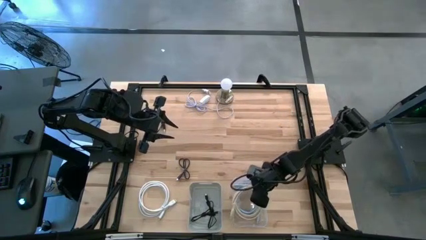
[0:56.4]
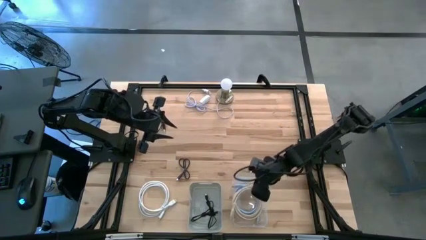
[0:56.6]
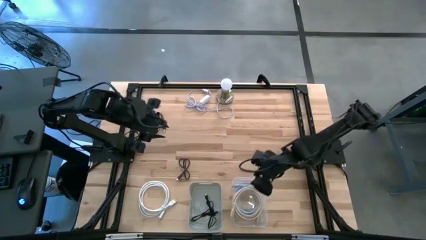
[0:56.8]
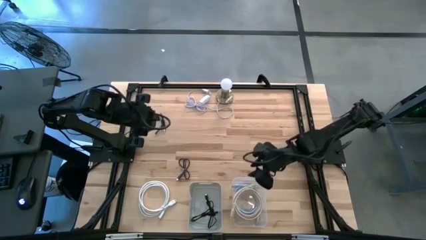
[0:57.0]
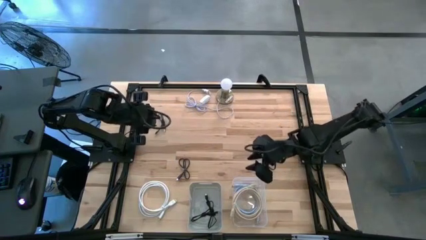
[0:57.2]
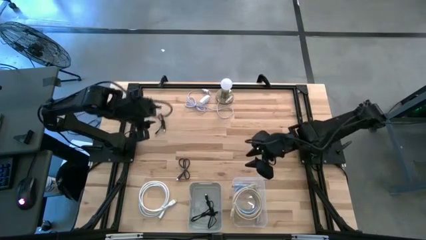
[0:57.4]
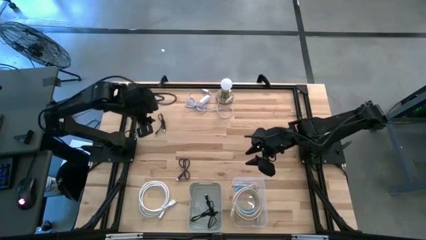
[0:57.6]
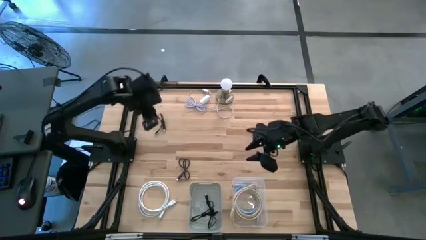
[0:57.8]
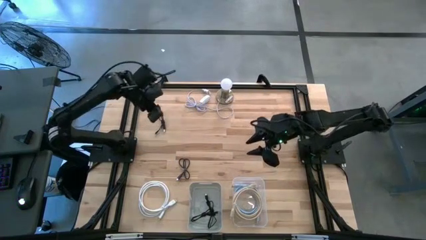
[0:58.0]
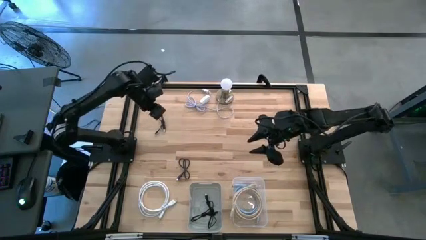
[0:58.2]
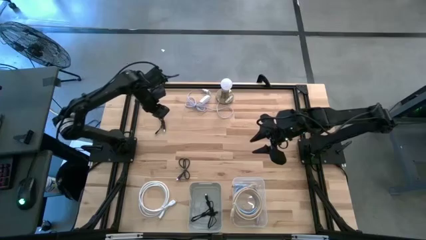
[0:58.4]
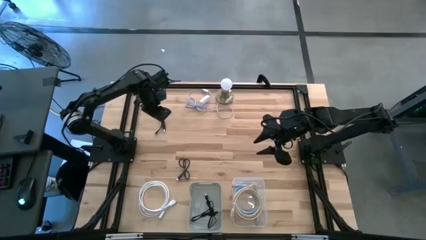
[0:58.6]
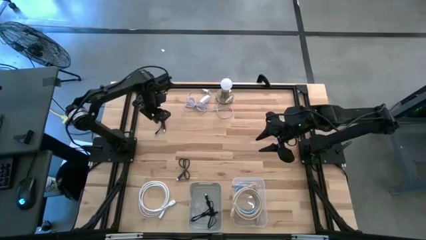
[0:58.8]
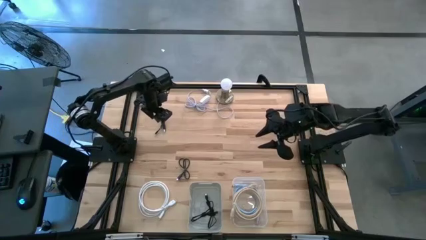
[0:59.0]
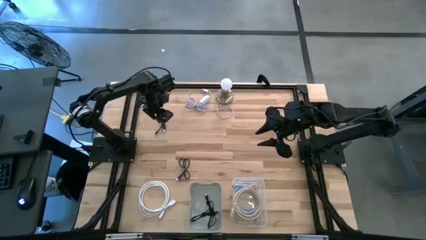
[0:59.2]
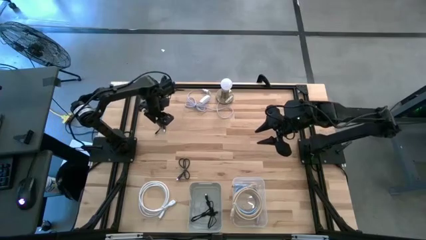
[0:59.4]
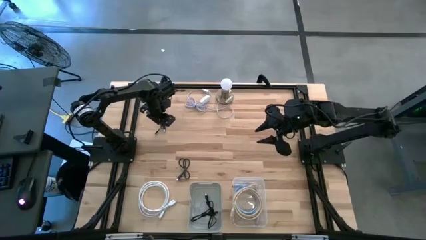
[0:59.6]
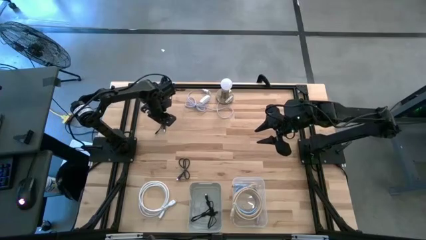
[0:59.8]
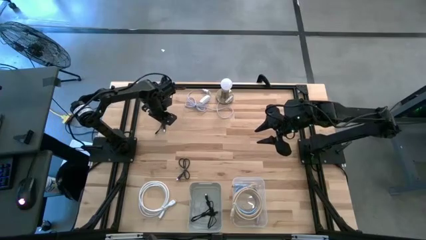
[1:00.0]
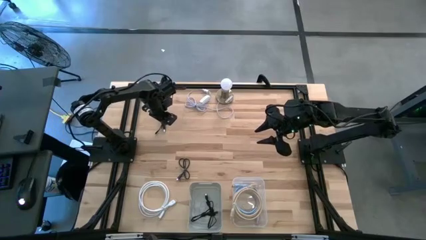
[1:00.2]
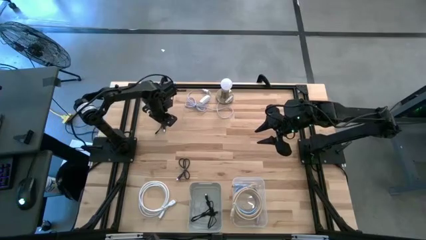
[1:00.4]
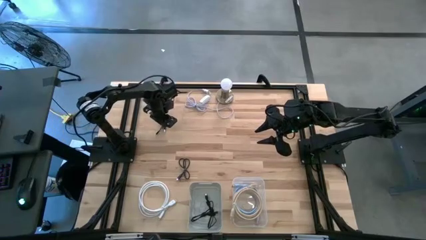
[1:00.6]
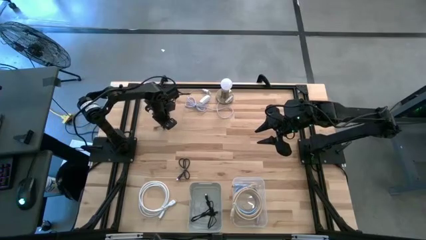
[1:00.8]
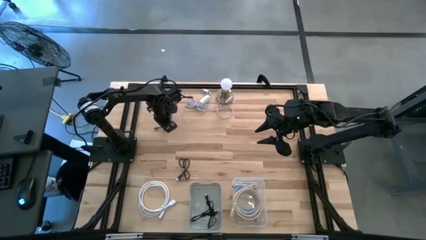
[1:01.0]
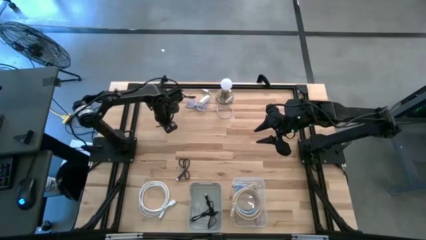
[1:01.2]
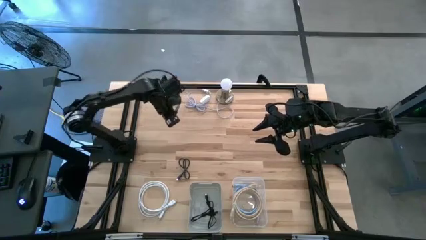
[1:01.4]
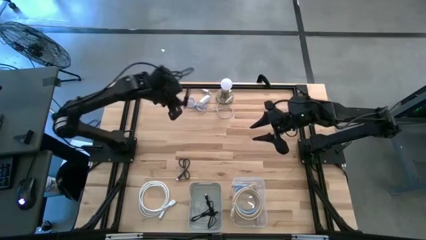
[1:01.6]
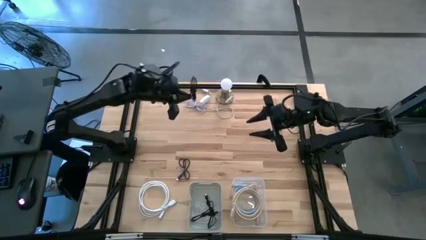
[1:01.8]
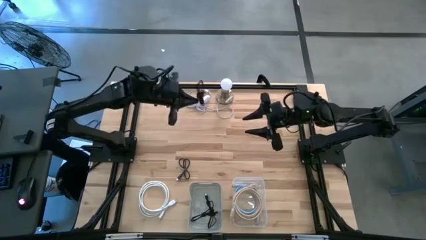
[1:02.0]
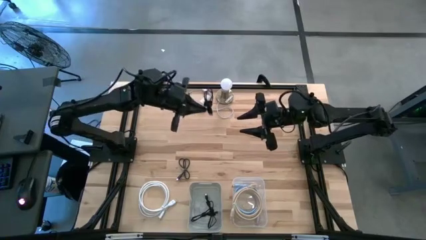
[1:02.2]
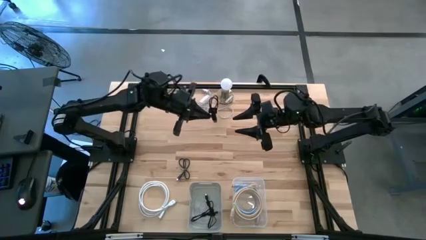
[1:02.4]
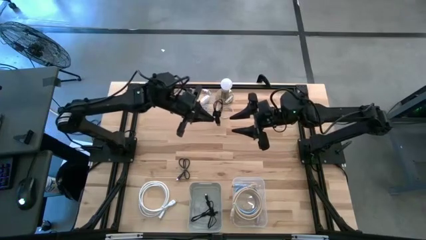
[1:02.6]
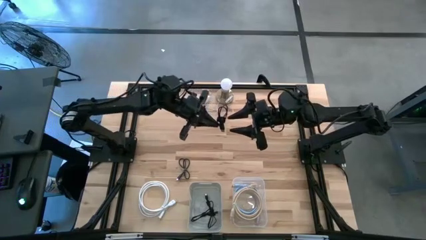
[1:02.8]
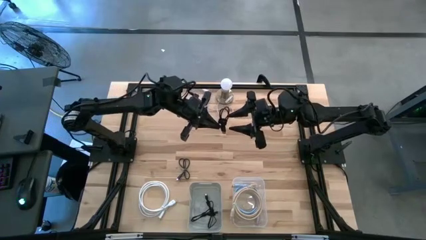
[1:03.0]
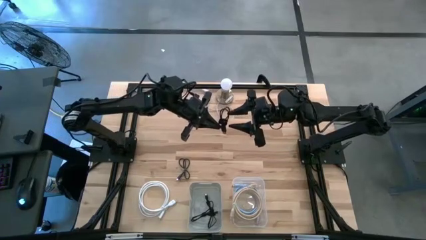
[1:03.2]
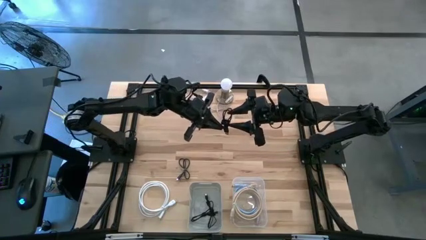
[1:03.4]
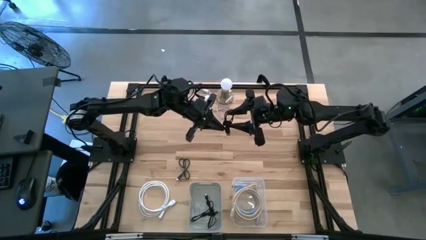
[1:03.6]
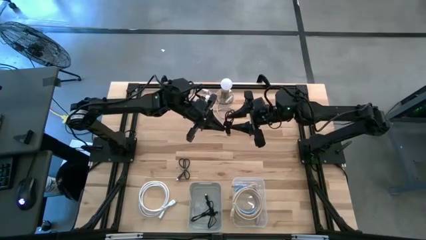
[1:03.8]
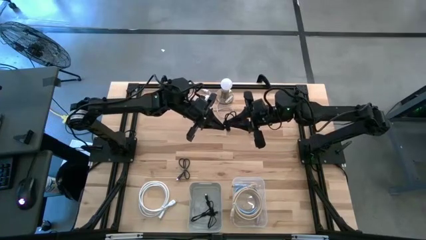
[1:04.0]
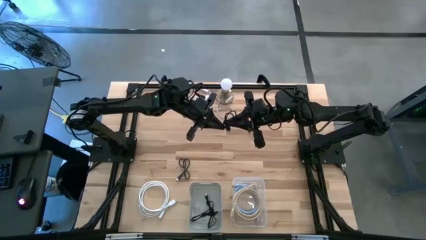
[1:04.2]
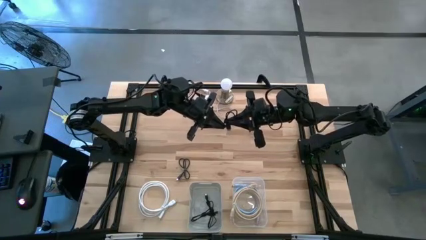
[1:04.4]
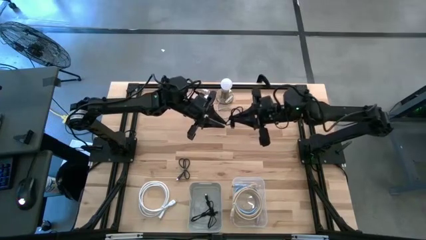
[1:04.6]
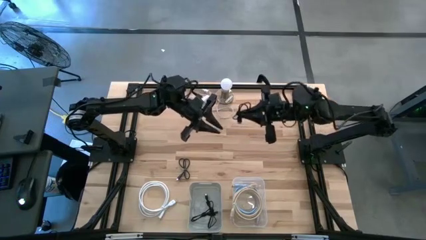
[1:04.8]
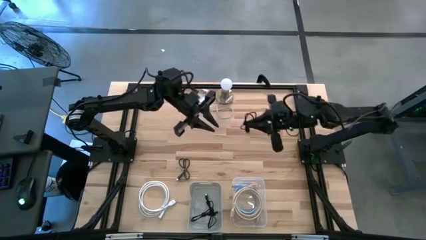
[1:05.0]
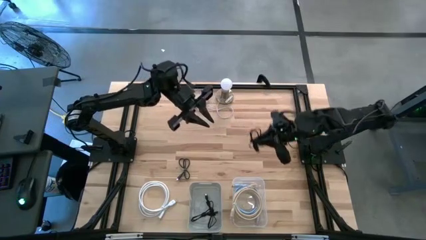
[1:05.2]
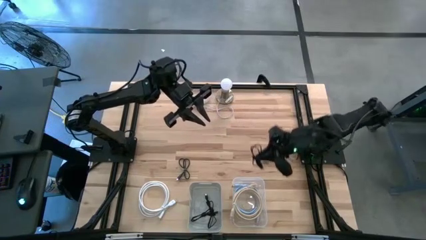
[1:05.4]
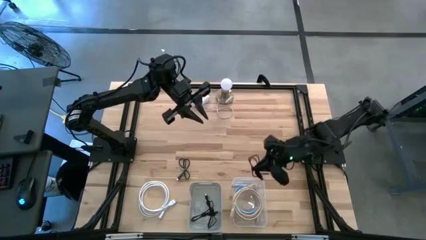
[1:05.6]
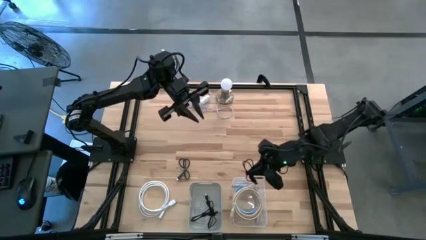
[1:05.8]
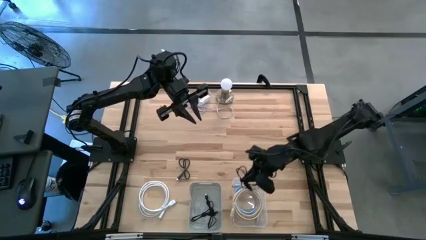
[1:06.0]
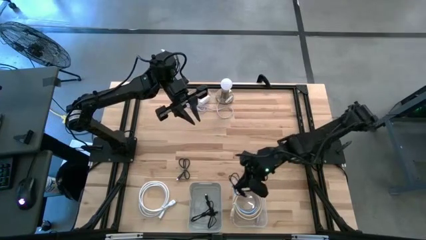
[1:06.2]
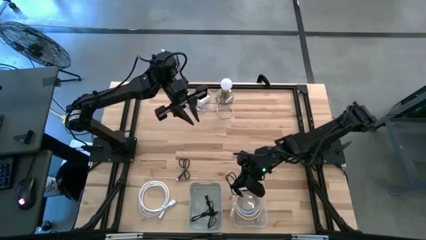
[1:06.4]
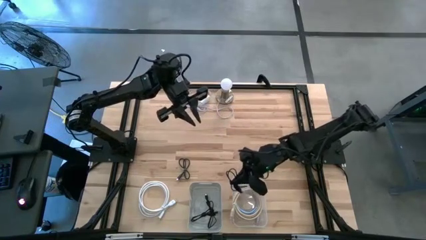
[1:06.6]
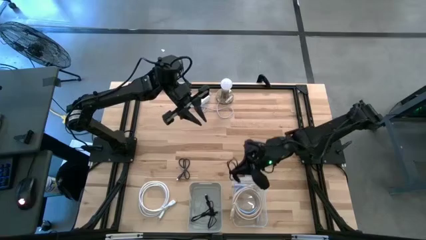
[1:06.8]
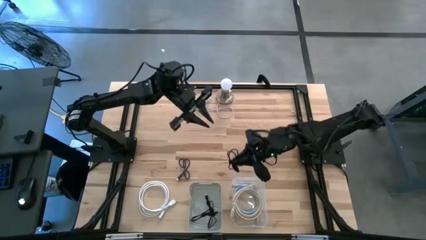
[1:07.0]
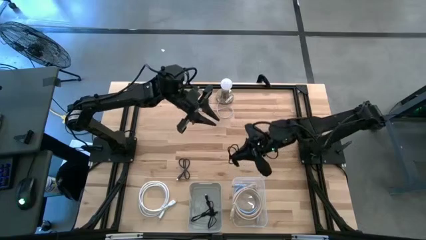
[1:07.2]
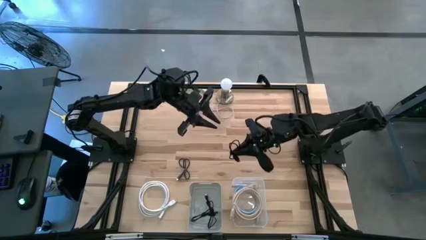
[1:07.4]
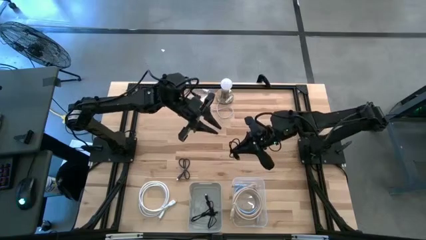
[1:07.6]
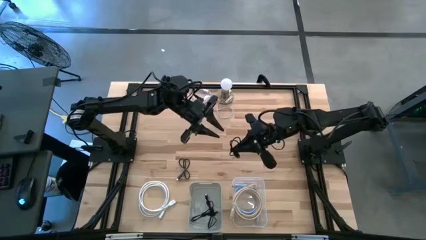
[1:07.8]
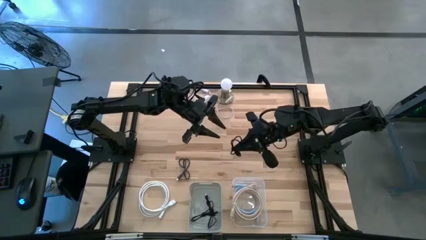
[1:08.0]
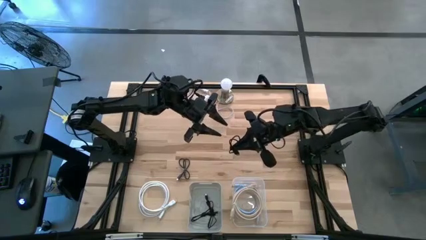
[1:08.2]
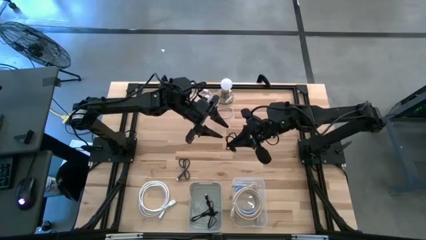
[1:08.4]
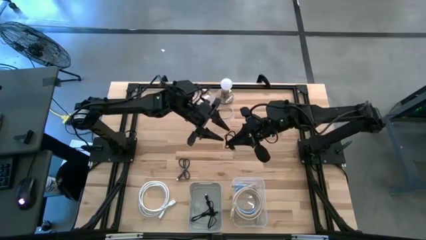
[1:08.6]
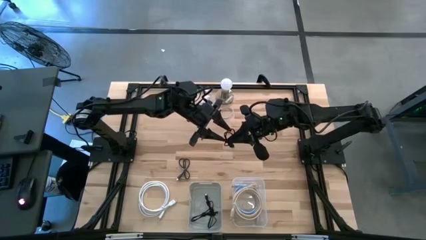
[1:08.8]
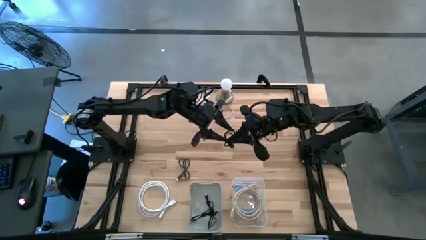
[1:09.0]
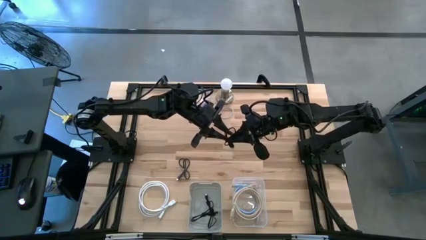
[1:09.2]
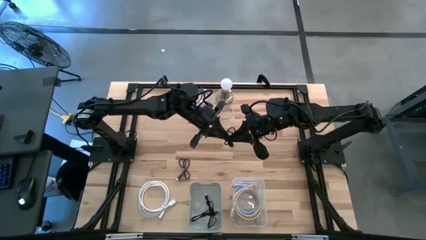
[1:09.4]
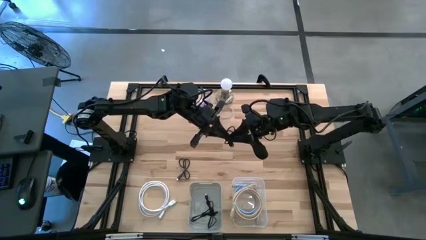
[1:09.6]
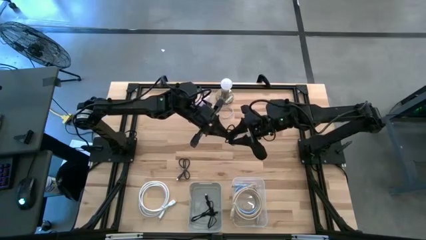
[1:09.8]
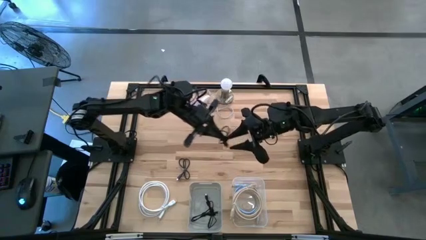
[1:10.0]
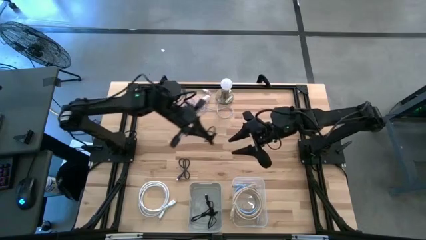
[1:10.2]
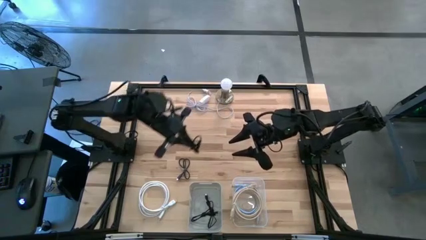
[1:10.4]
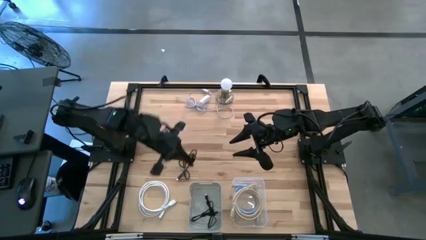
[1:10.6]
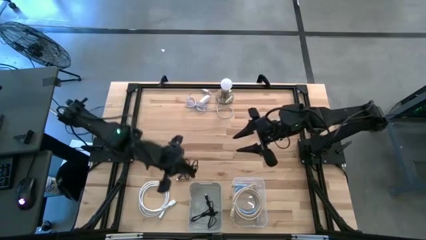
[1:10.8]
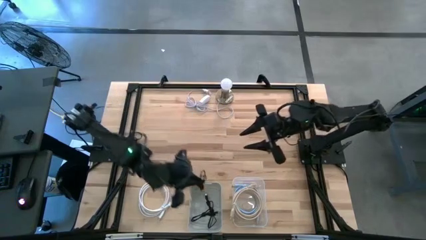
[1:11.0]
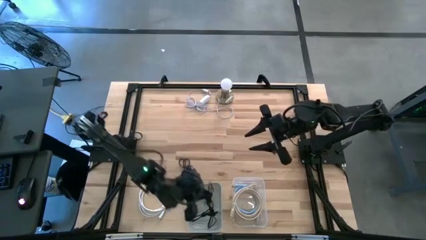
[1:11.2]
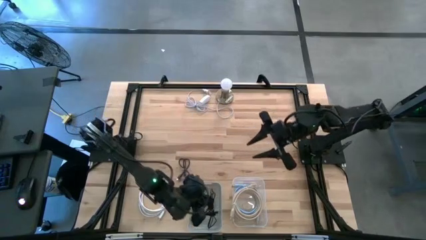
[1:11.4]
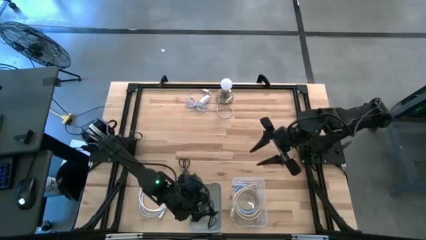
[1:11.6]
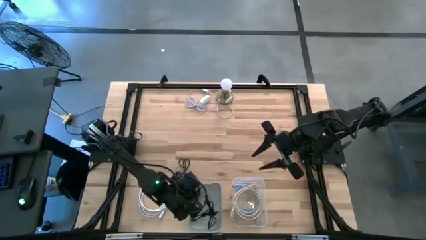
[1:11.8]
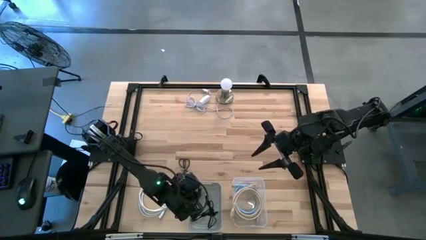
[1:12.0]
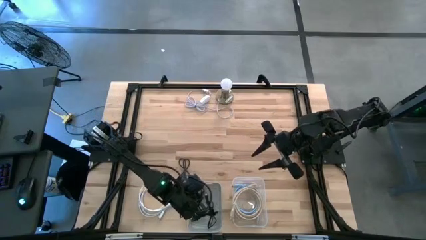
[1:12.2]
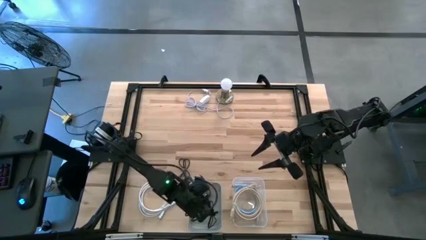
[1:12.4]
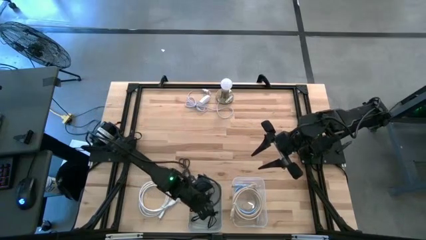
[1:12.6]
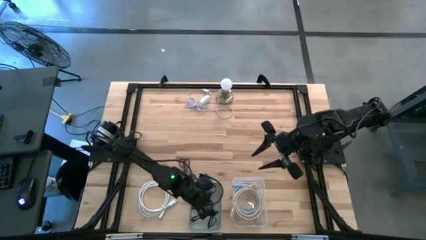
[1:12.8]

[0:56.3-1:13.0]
Task: Pick & Place USB Port
Put the black USB cable into the gray bin
